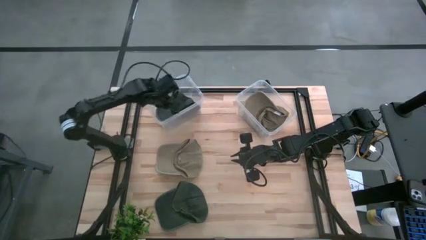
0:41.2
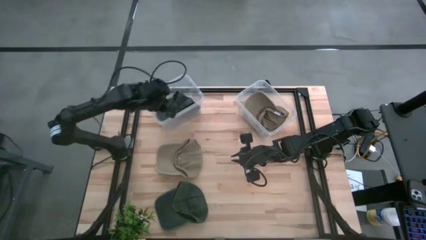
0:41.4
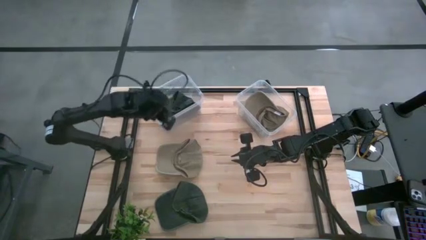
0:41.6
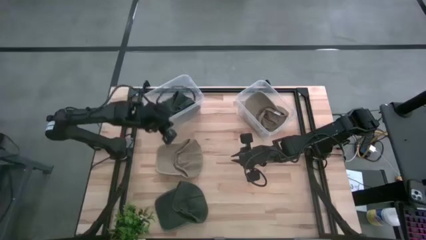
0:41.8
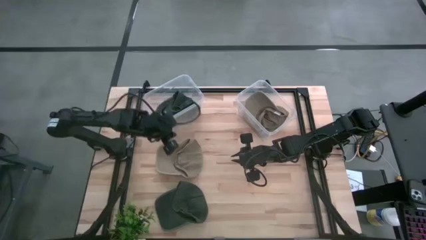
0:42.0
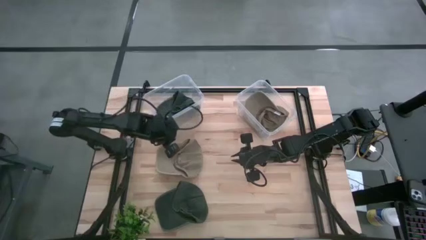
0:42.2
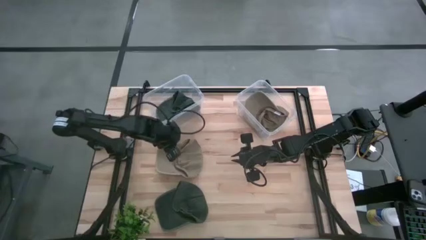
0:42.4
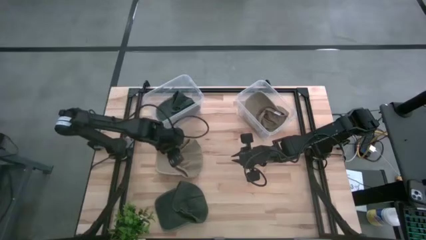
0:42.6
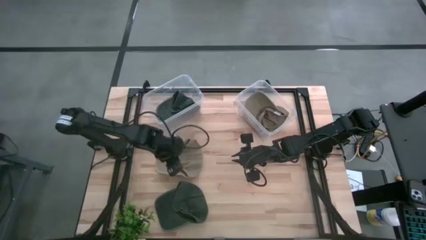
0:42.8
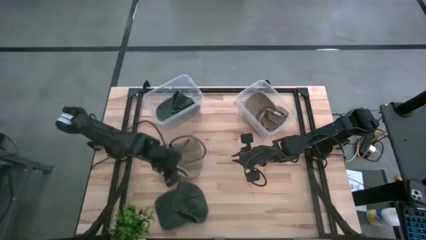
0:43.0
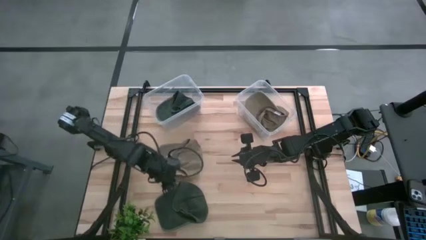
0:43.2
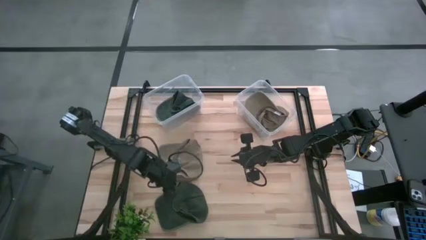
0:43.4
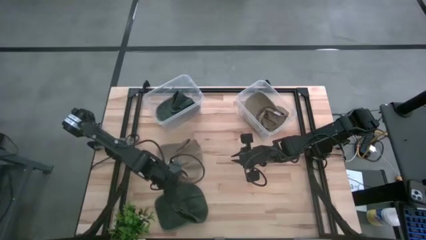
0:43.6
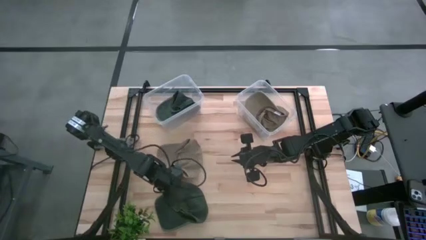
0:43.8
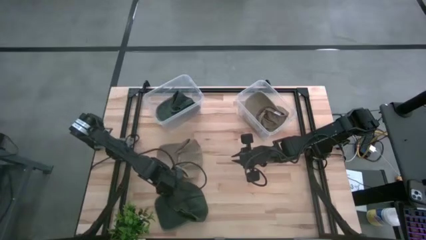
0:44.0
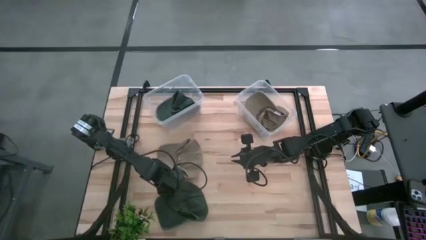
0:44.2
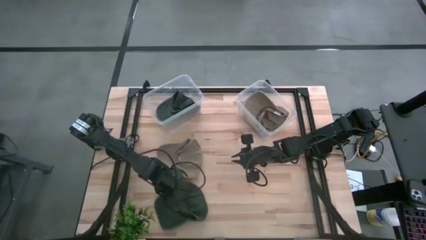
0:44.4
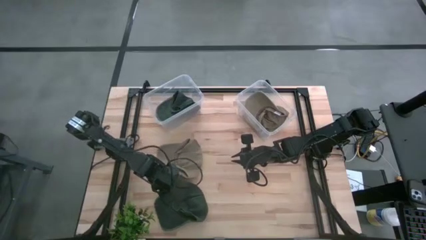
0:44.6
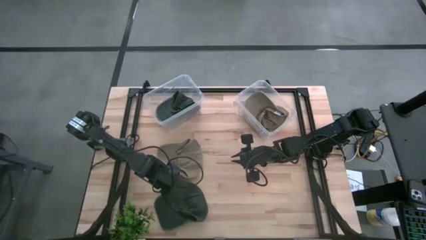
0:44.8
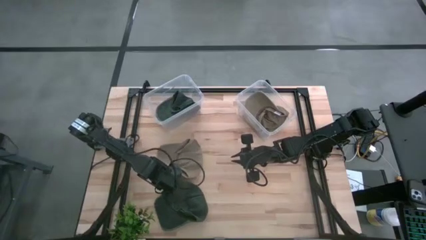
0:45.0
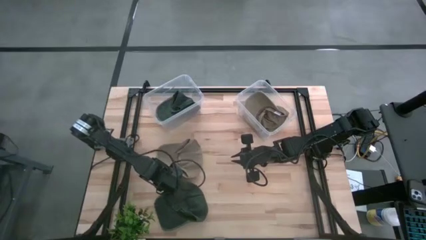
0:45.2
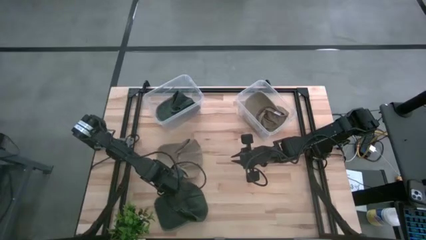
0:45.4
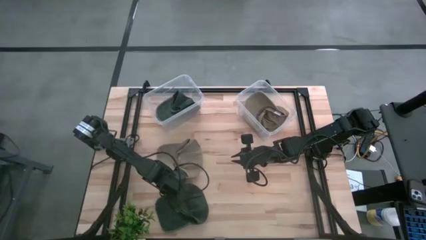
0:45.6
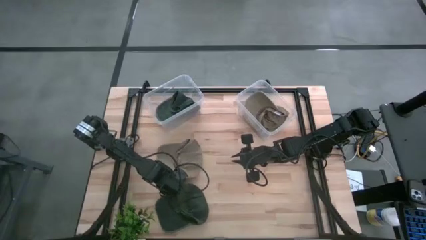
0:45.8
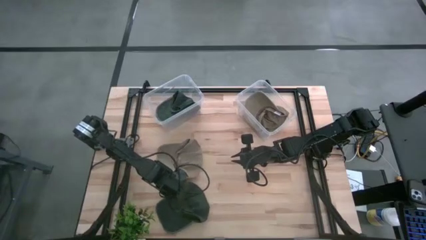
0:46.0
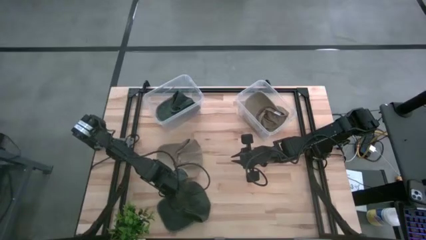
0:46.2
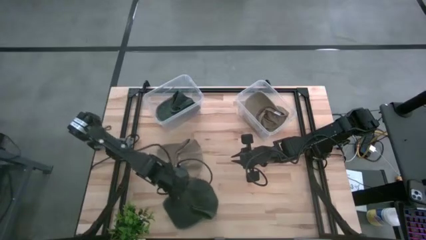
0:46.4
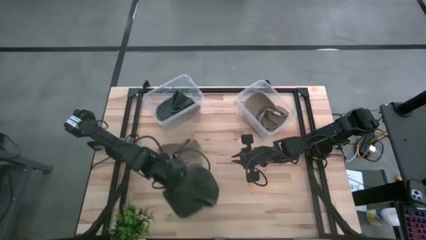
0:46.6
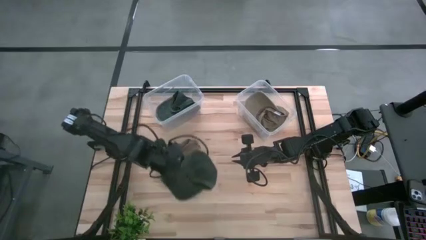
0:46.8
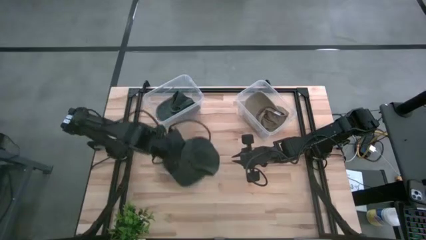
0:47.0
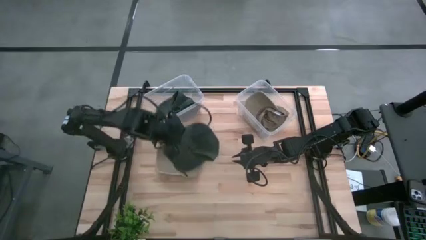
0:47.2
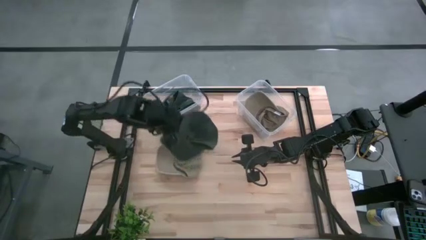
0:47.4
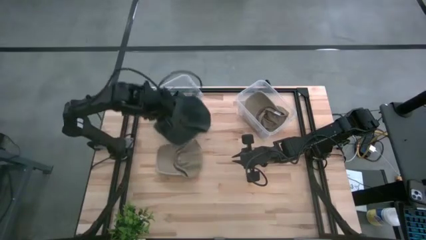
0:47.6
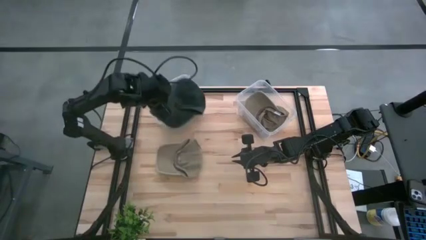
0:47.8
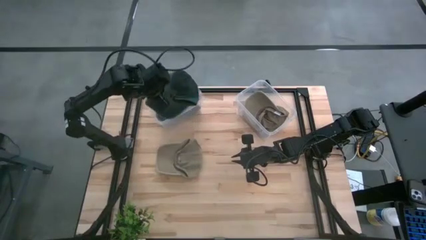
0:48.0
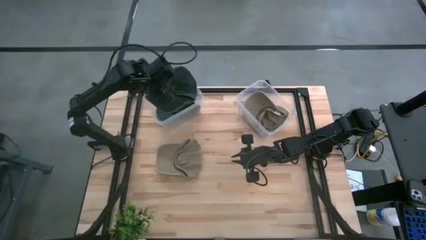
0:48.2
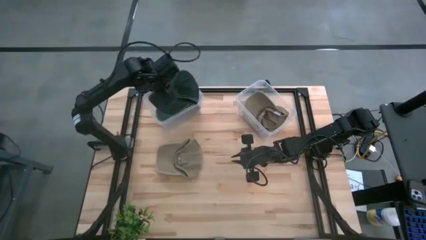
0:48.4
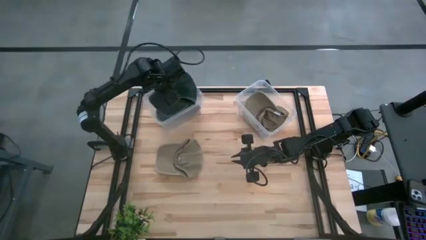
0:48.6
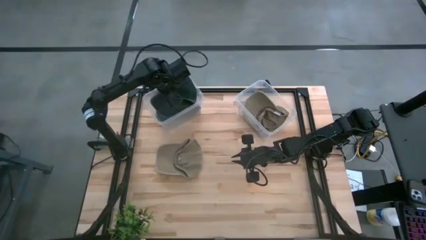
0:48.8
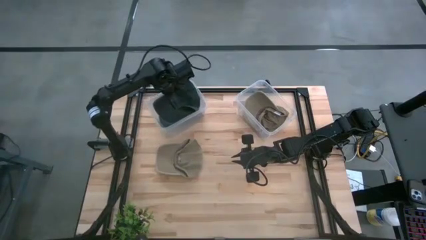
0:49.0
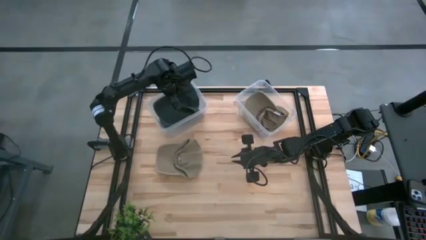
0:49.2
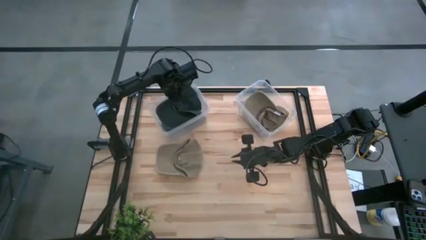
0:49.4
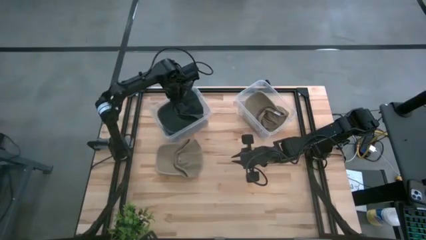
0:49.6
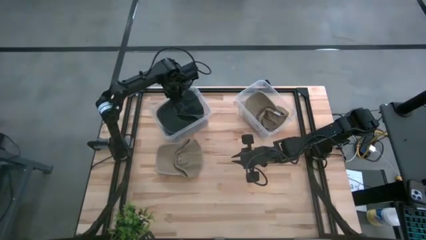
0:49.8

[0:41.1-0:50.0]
Task: Pick & Place hat
Put the black cap into the left transparent bin

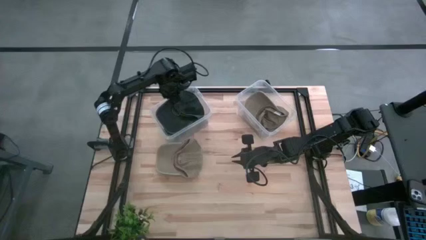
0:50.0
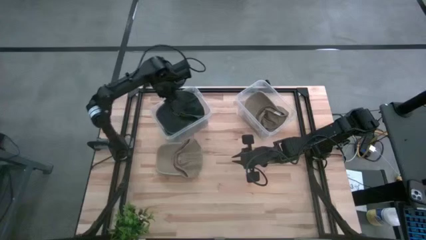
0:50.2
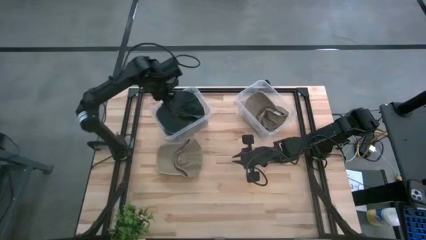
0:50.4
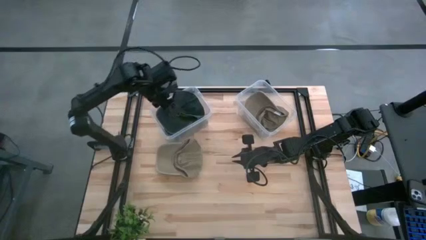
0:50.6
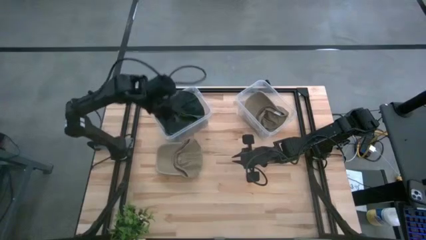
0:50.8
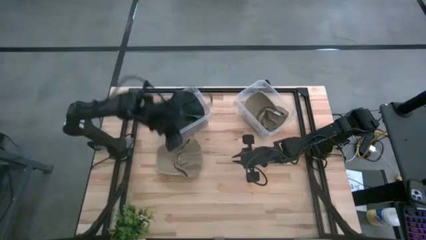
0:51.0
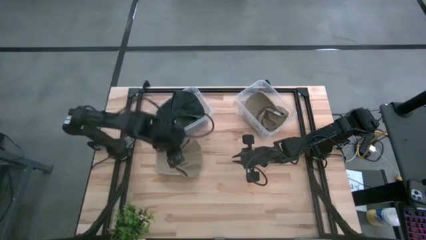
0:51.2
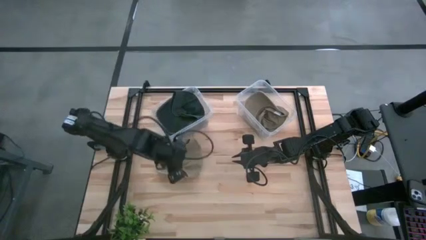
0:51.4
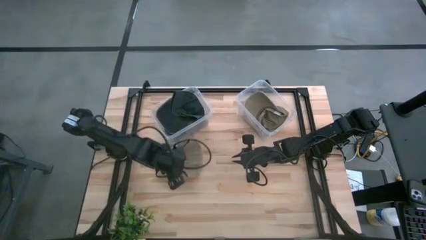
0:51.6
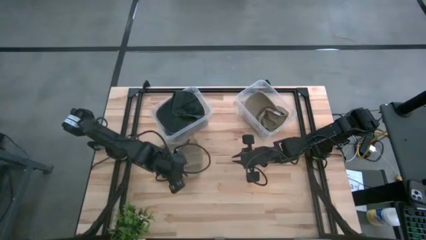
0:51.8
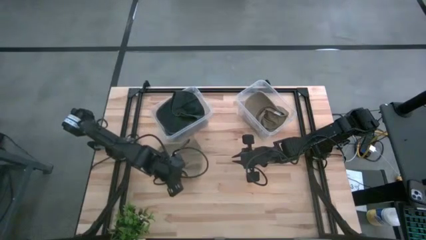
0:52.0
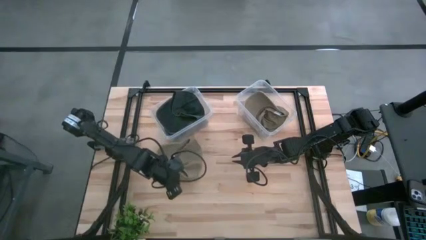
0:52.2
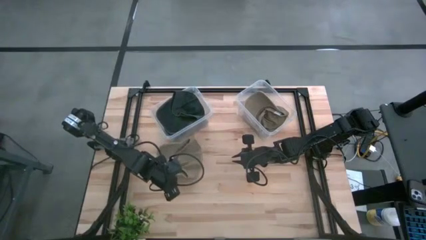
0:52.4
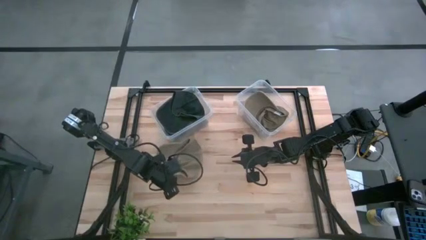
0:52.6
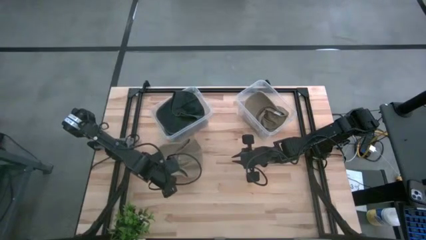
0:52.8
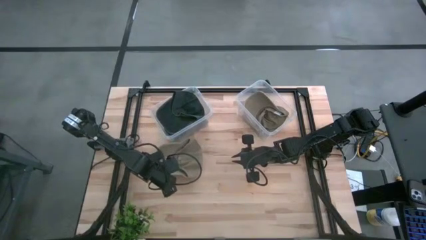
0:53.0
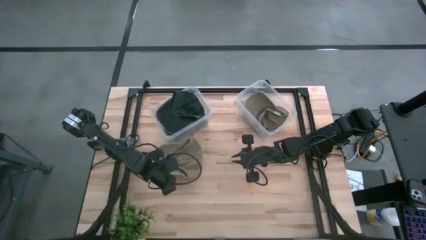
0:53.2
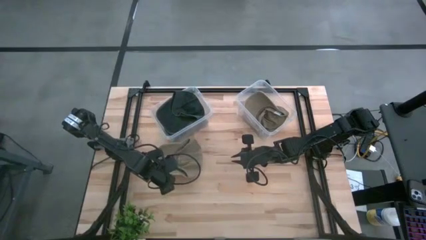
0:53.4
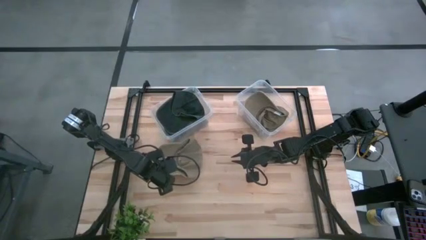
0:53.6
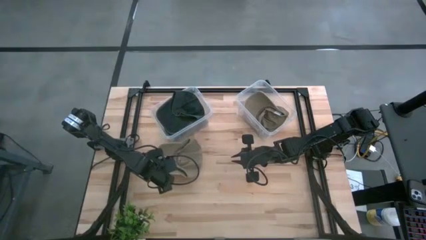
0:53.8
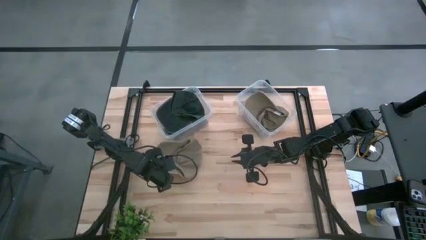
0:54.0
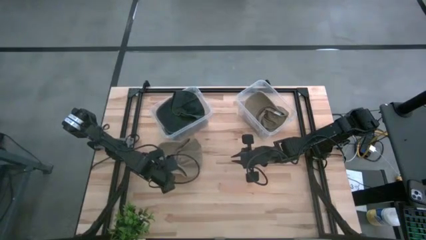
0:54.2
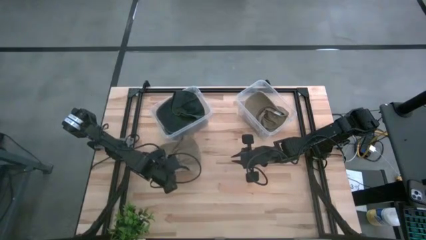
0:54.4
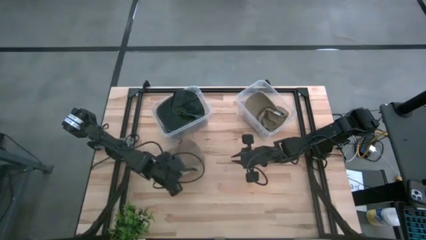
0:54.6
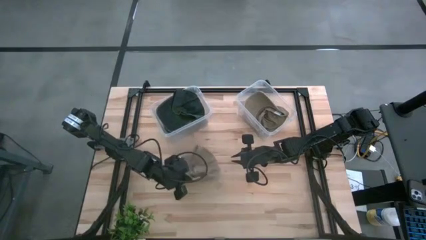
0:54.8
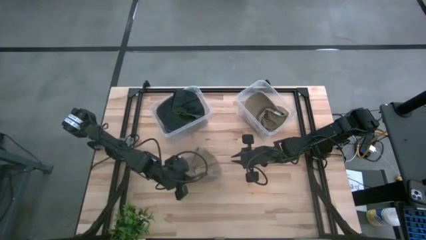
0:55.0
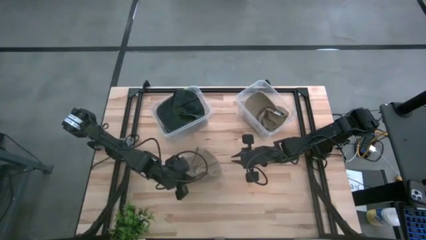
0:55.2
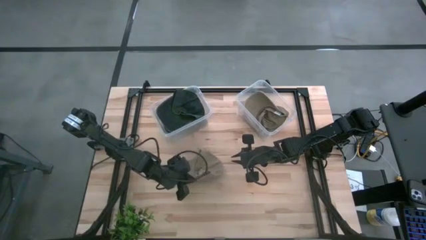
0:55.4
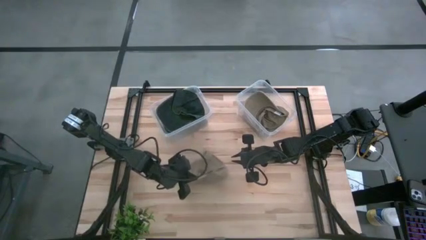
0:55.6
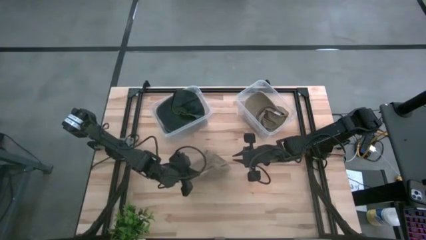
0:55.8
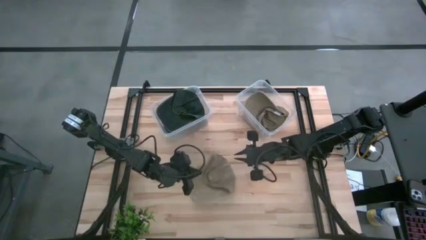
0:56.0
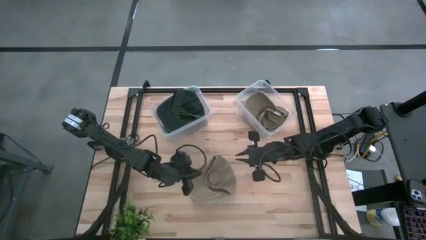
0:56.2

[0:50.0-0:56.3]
Put the brown cap into the right transparent bin
